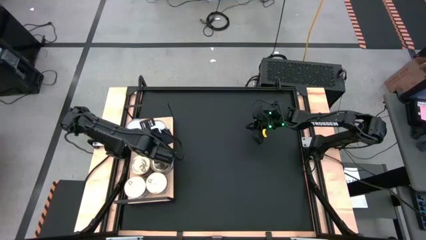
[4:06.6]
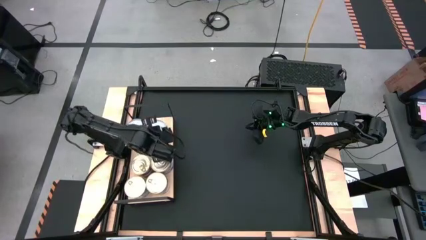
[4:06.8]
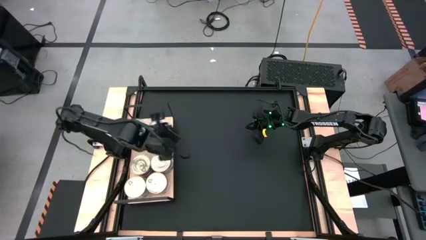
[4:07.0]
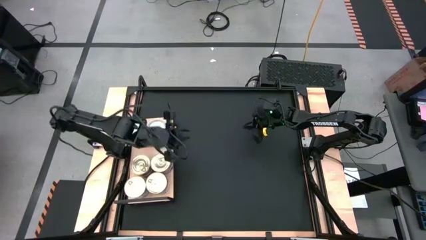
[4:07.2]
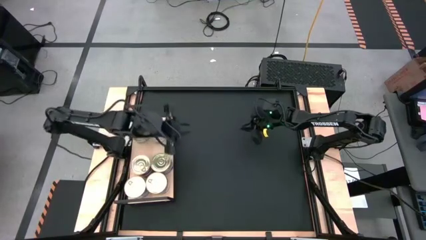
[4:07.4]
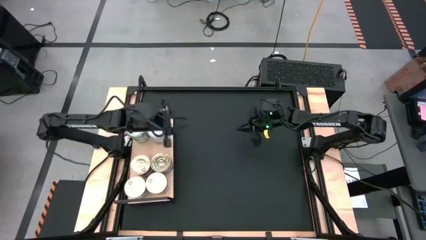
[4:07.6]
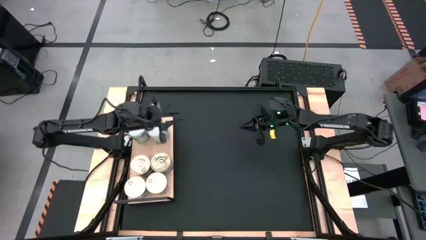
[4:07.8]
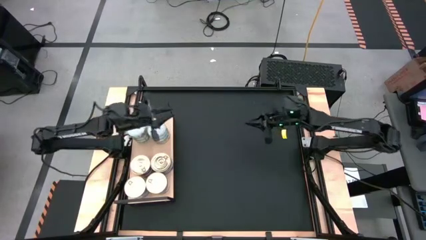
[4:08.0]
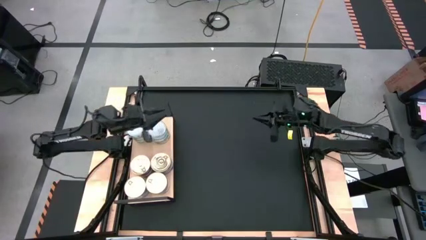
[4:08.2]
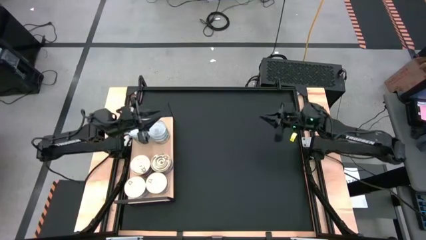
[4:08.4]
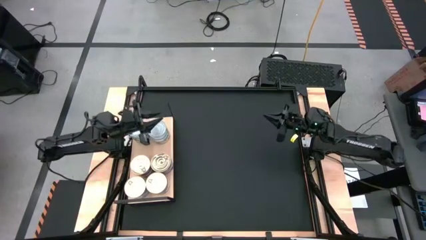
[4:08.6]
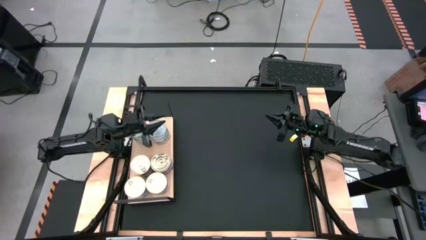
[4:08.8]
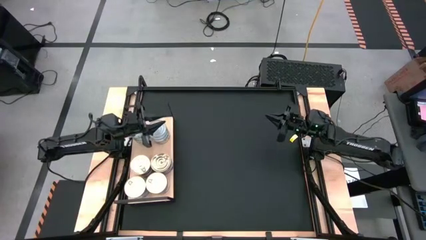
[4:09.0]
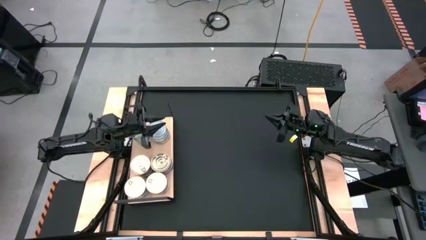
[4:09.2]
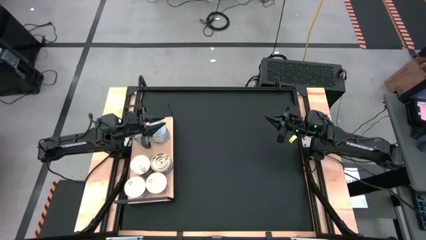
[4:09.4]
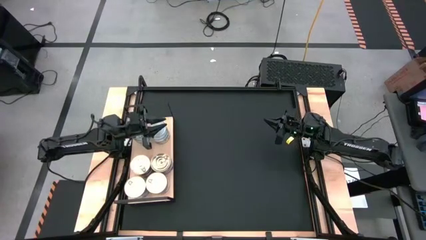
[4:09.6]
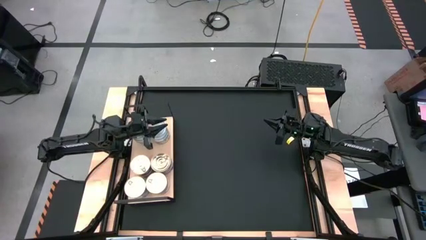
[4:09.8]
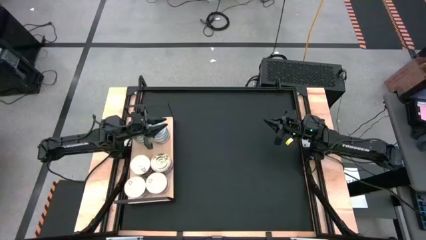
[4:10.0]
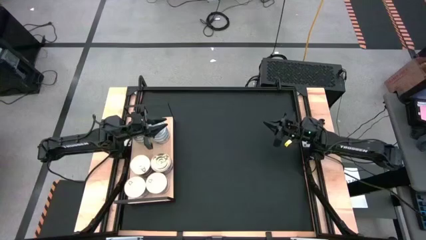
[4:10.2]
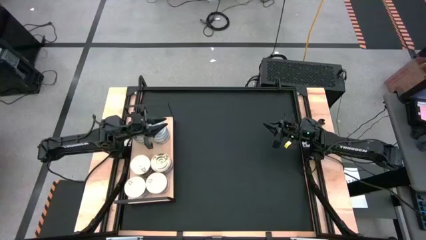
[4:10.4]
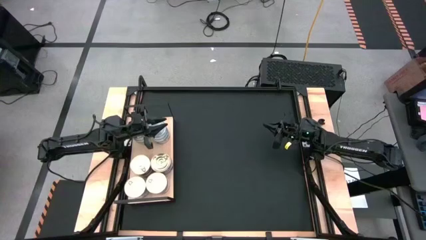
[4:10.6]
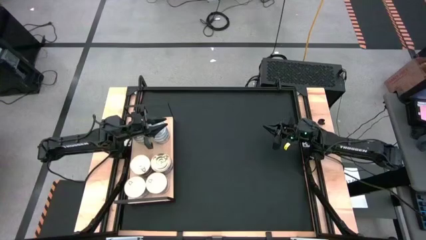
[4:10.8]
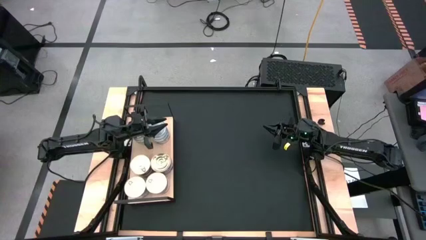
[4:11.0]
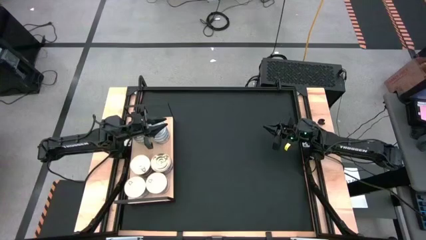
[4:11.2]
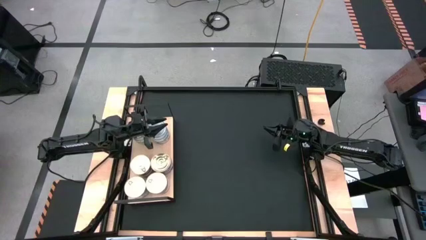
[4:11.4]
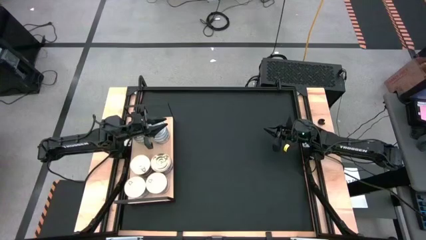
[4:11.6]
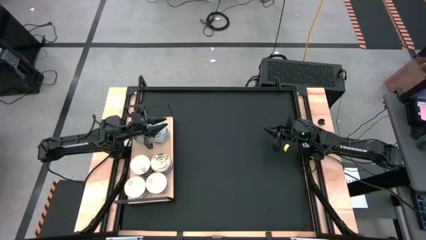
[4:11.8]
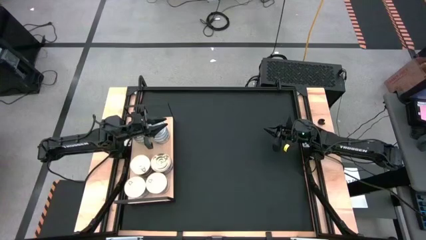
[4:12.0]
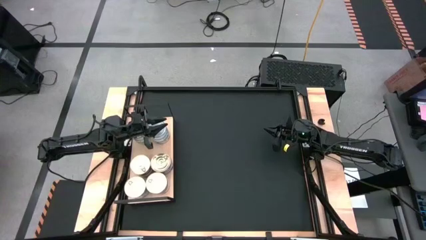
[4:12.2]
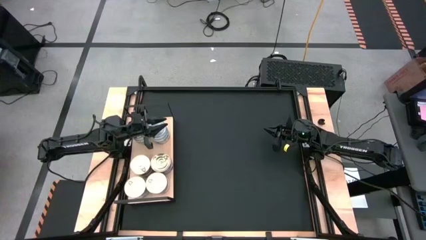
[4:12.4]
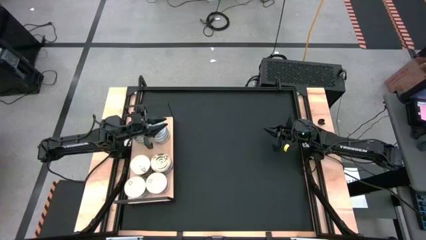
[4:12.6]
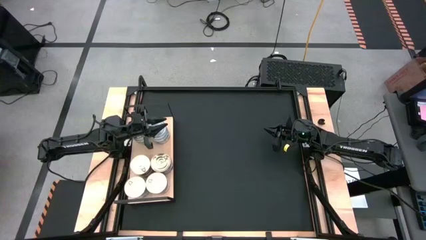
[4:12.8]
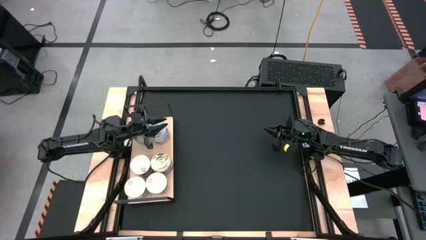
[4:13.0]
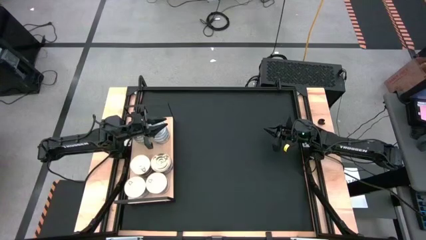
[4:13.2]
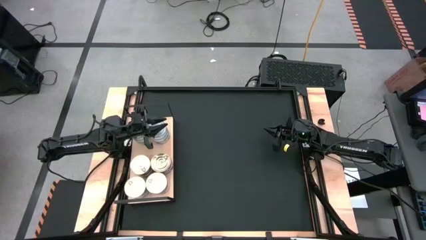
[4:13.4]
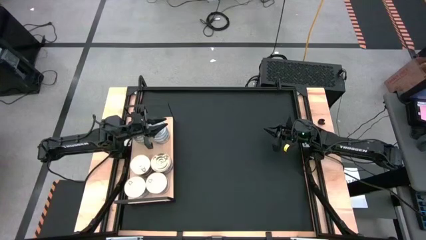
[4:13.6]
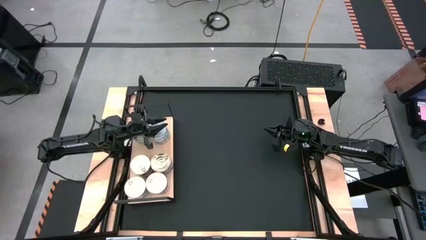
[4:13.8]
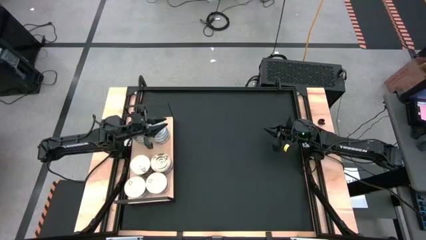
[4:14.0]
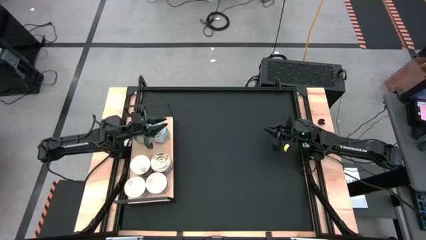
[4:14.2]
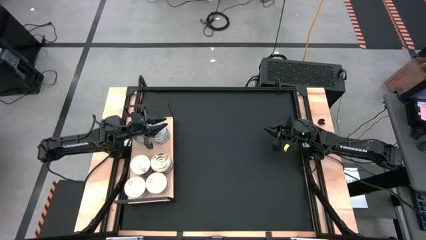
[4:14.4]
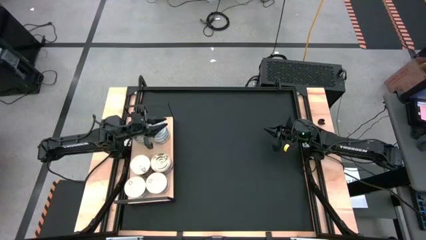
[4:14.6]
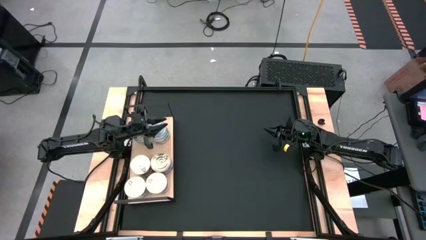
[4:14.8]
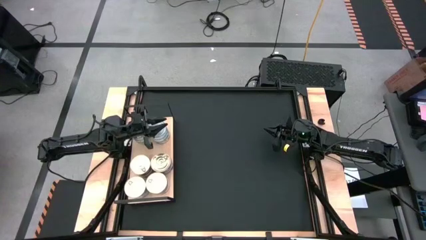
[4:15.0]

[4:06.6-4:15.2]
Task: Stack canned seafood by type on shelf
Return to Home Position

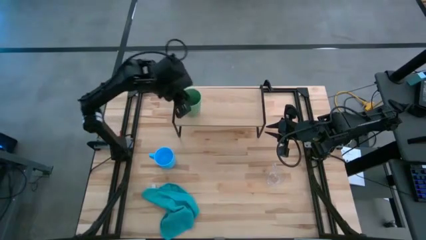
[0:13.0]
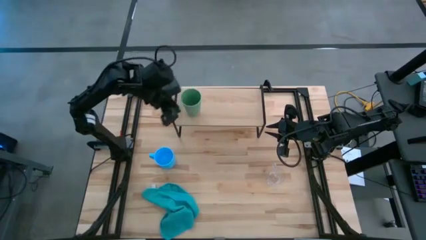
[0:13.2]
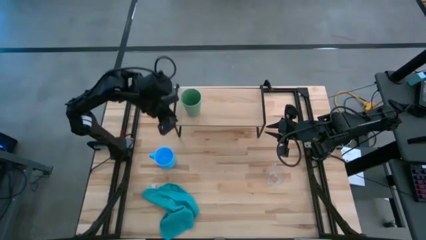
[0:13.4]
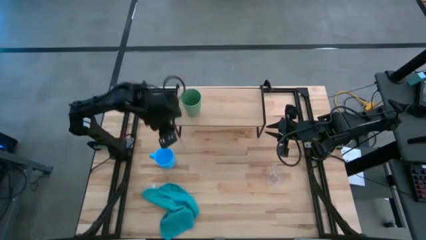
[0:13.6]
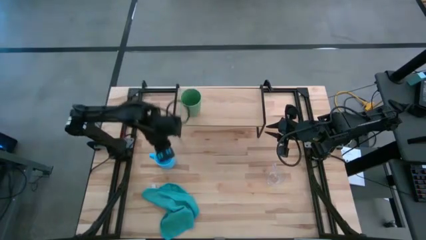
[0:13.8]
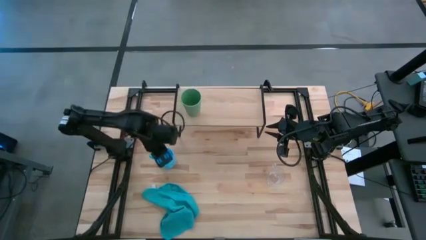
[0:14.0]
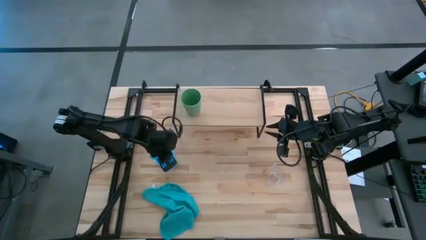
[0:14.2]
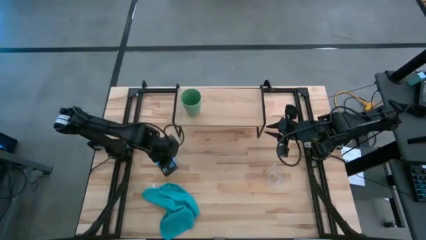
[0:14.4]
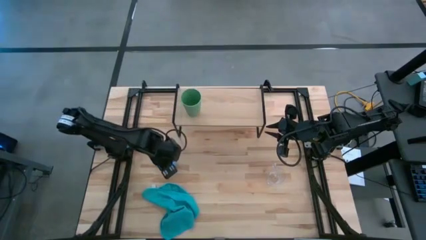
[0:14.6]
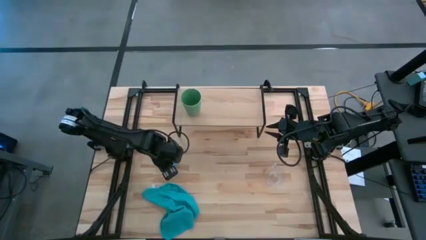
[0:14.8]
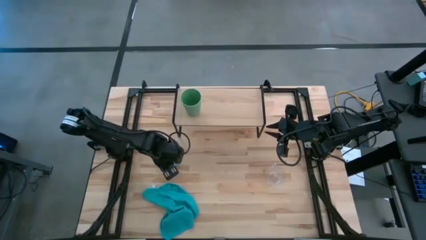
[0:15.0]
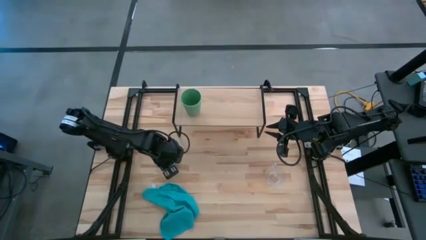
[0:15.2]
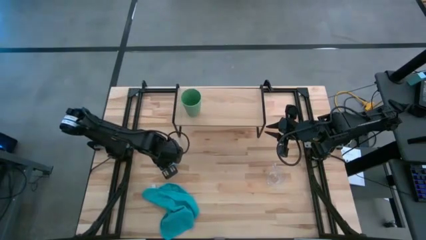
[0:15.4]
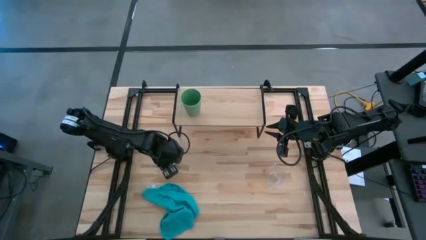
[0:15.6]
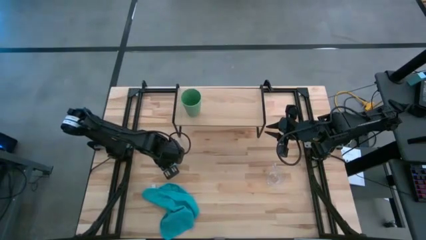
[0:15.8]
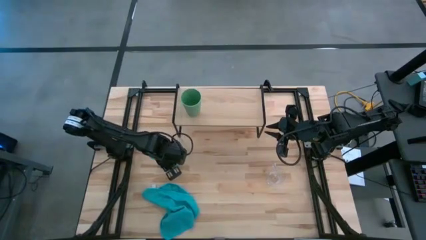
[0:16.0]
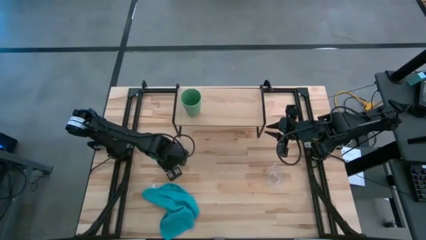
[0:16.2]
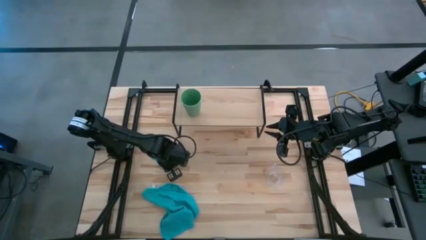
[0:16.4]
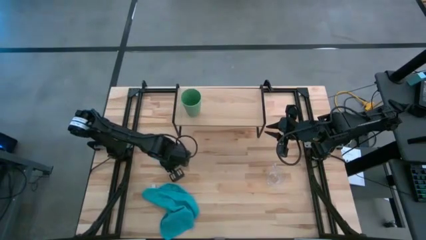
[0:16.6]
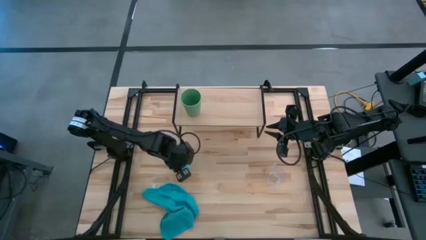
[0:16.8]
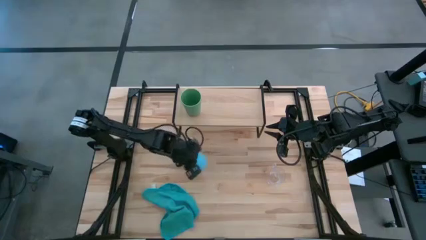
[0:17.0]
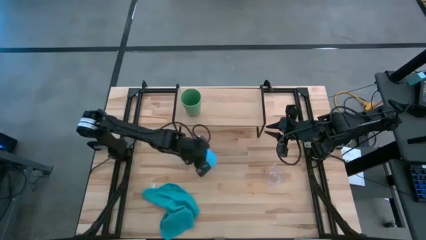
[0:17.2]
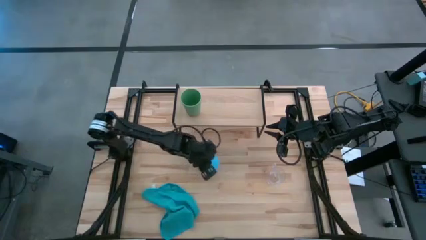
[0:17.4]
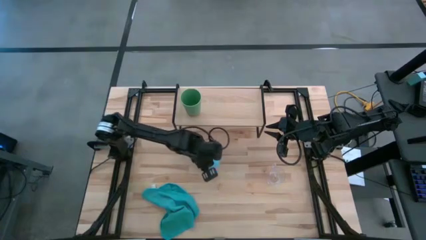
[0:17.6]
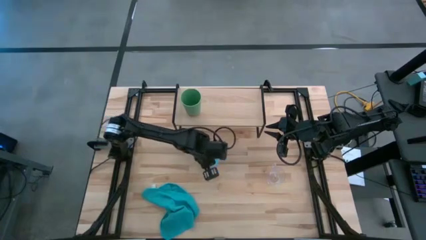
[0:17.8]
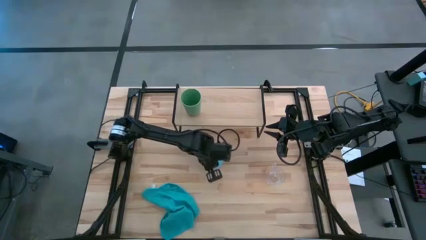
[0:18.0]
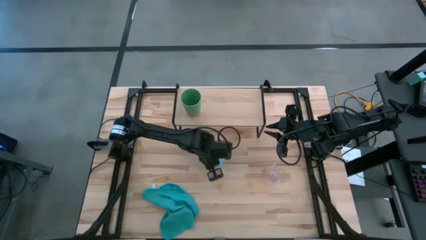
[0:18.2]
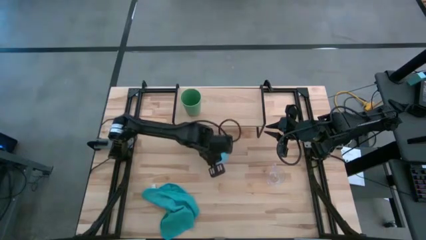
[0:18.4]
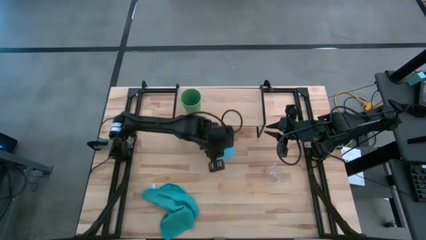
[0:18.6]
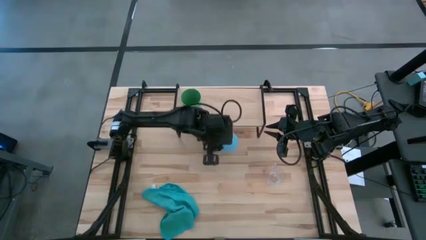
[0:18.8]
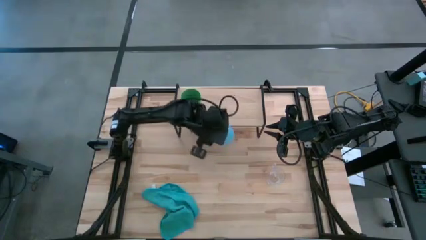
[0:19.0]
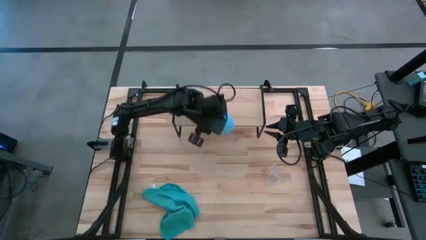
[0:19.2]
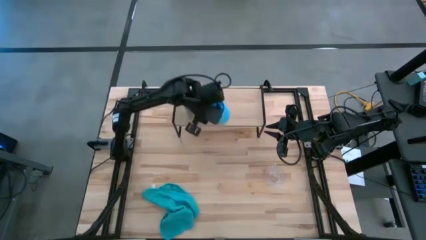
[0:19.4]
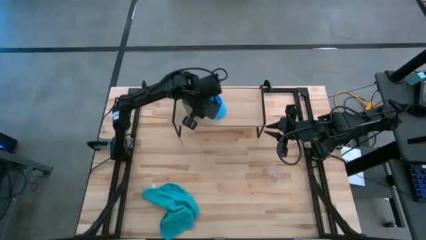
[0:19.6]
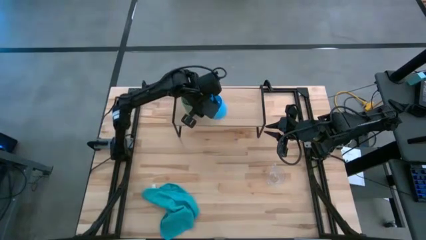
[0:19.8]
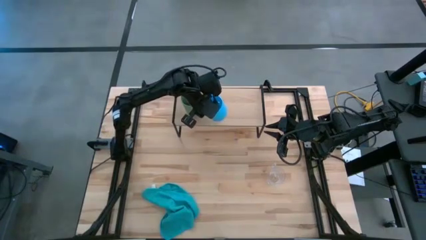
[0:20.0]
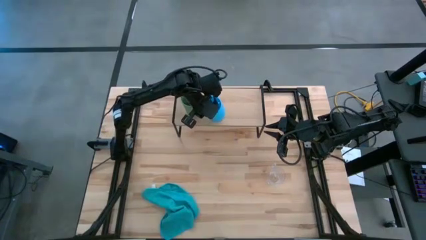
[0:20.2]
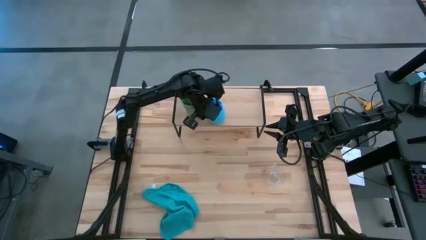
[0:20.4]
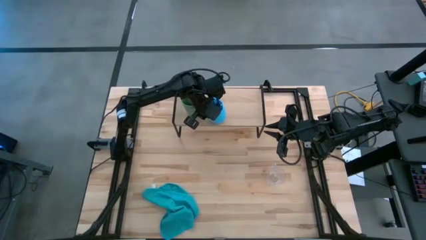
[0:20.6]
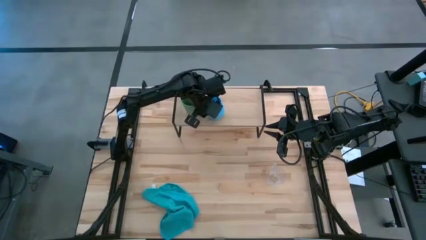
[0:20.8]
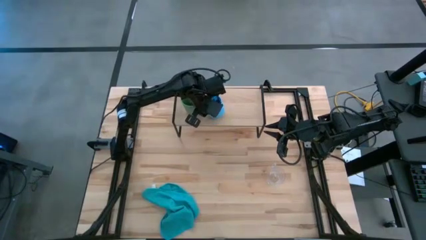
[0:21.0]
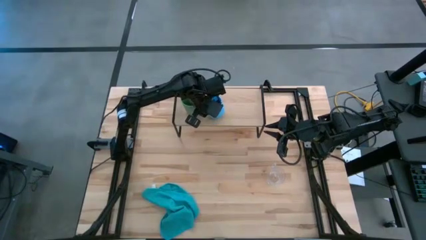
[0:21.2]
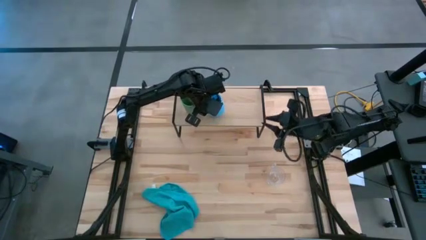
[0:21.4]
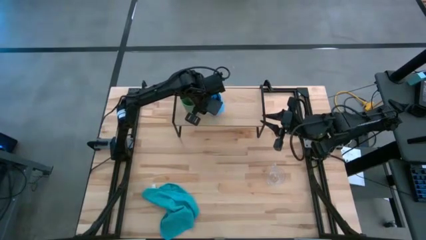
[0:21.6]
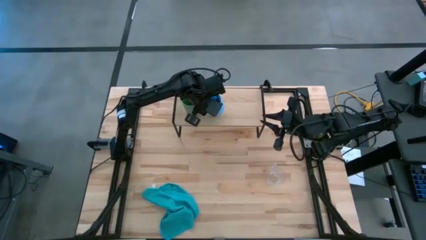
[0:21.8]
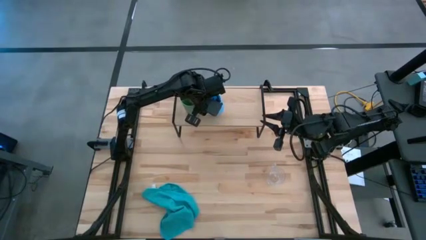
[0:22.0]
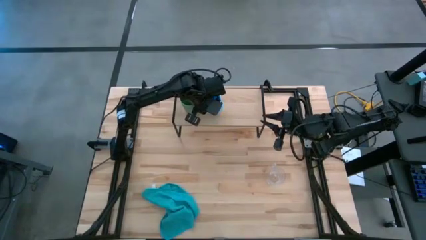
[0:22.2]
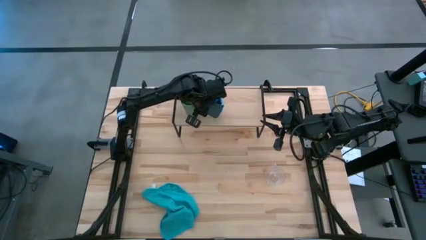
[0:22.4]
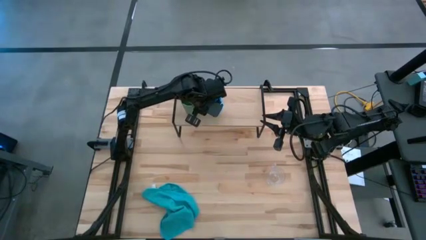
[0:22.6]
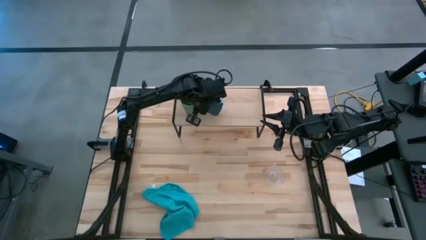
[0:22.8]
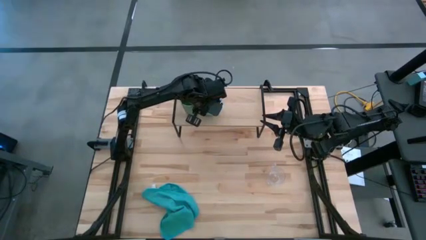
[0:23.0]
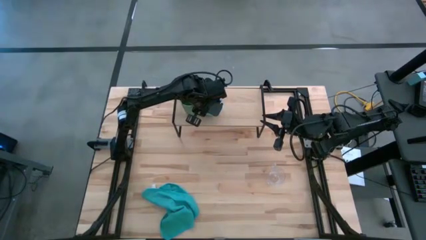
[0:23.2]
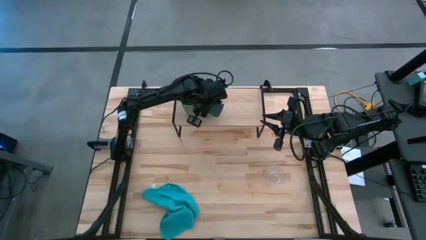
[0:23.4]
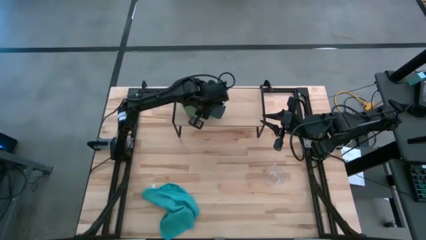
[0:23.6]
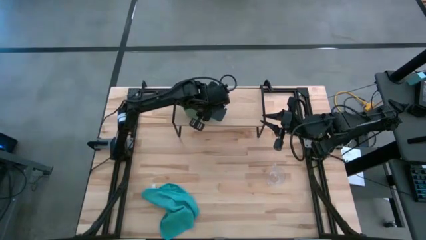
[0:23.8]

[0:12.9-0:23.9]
Task: Stack small to large cups/mugs on shelf
Put the blue cup on the shelf
